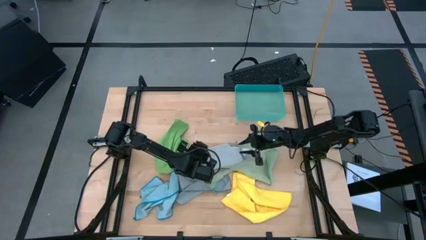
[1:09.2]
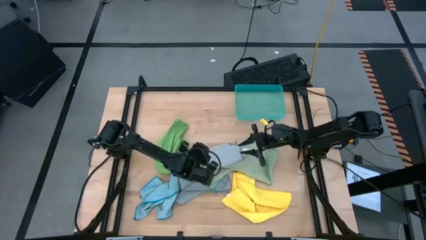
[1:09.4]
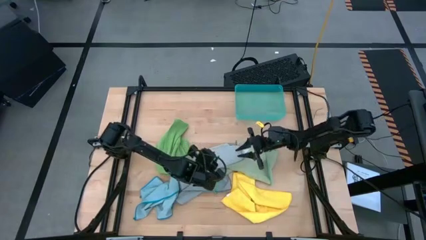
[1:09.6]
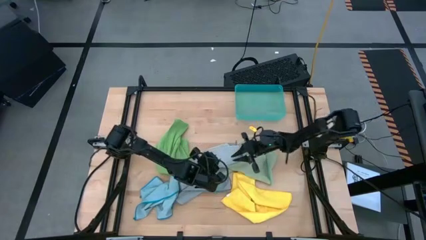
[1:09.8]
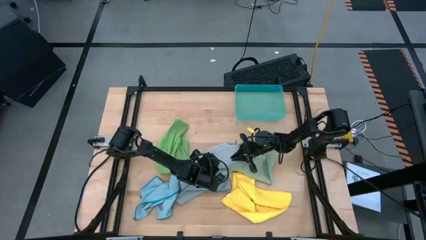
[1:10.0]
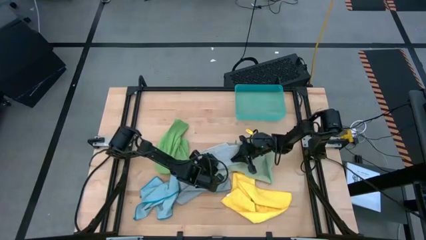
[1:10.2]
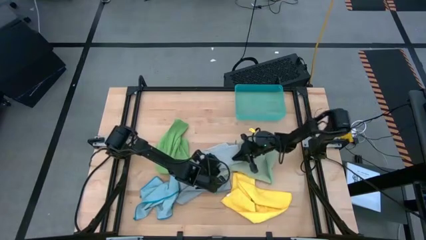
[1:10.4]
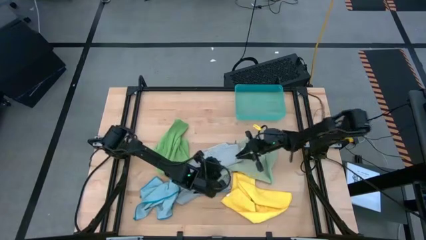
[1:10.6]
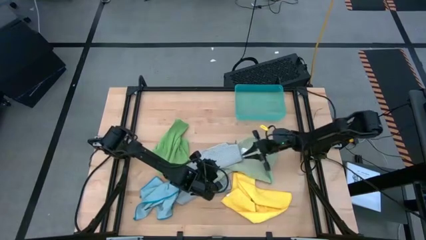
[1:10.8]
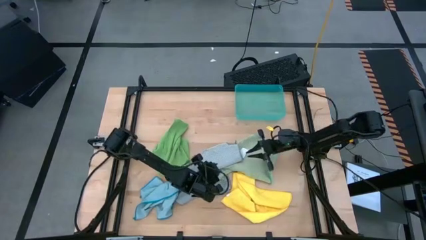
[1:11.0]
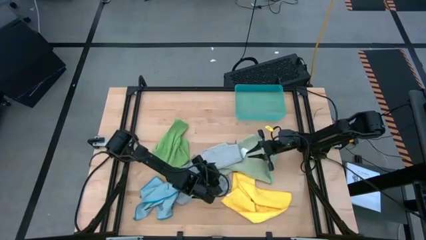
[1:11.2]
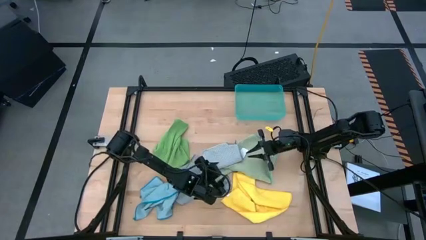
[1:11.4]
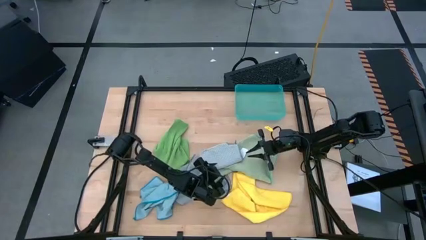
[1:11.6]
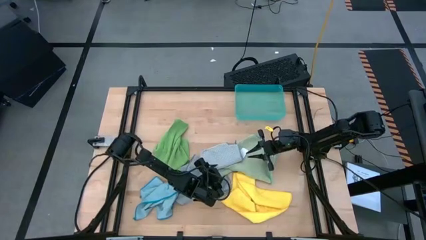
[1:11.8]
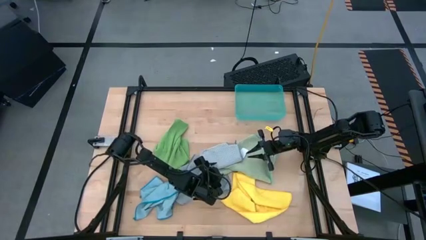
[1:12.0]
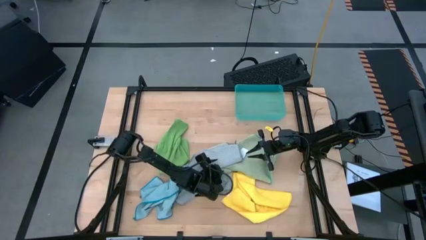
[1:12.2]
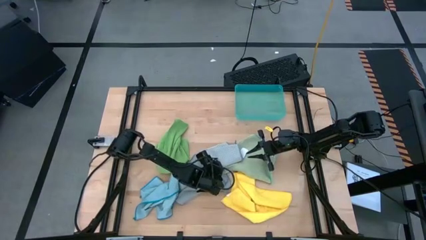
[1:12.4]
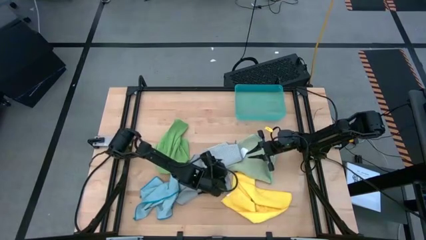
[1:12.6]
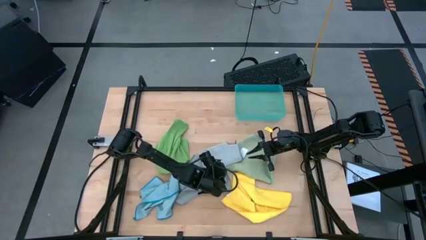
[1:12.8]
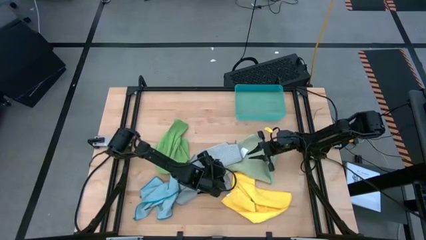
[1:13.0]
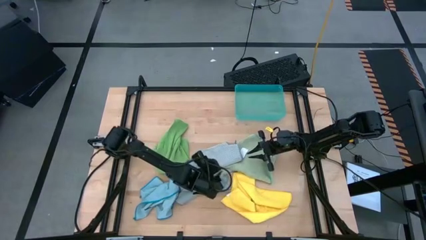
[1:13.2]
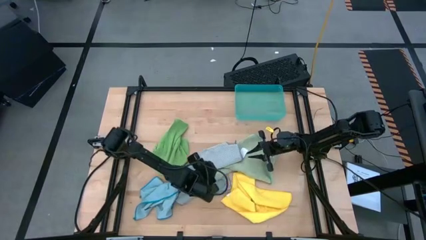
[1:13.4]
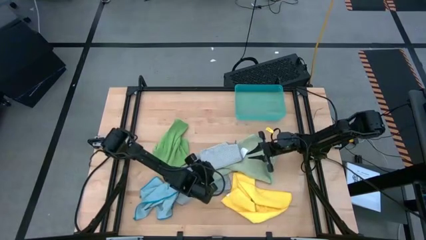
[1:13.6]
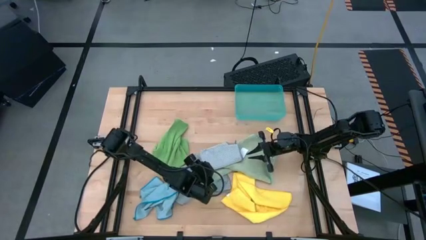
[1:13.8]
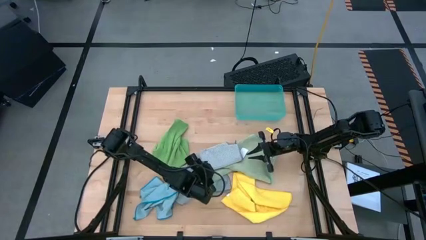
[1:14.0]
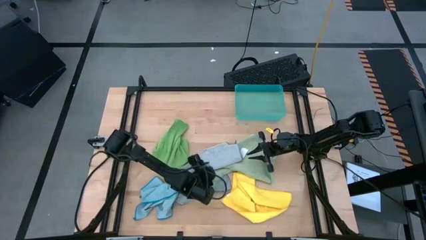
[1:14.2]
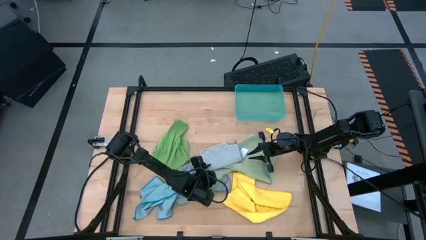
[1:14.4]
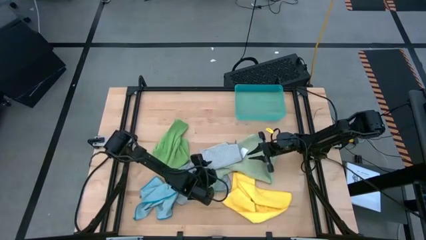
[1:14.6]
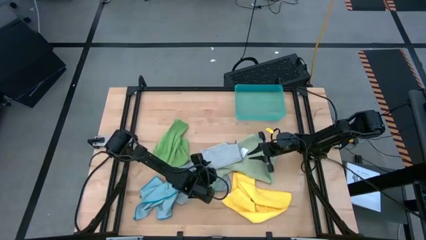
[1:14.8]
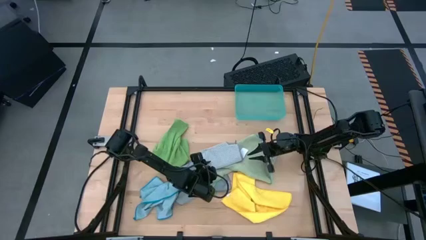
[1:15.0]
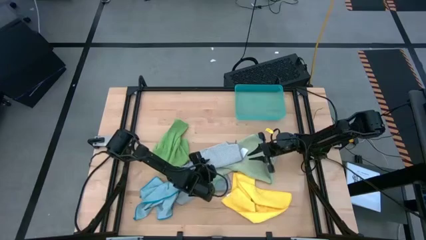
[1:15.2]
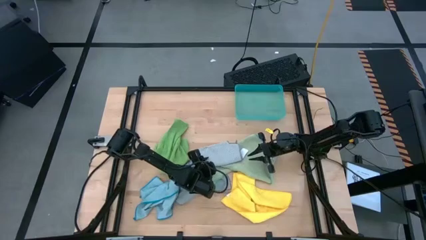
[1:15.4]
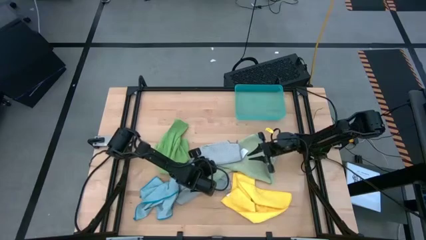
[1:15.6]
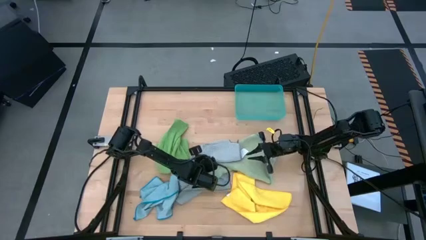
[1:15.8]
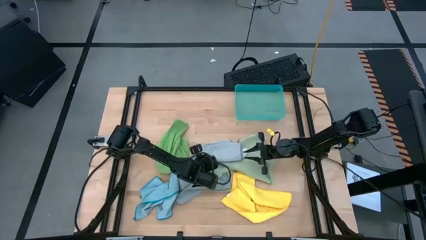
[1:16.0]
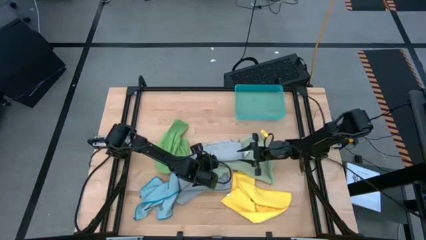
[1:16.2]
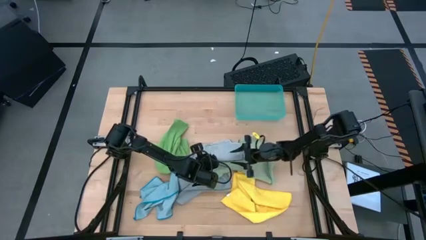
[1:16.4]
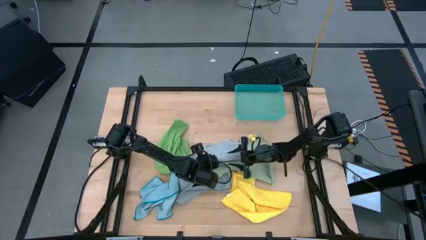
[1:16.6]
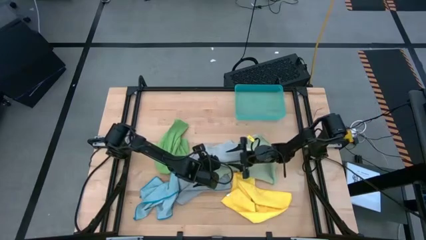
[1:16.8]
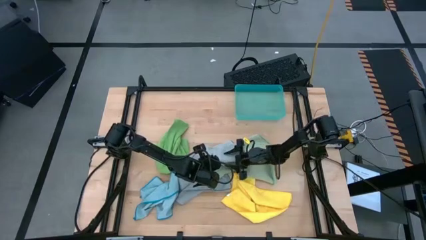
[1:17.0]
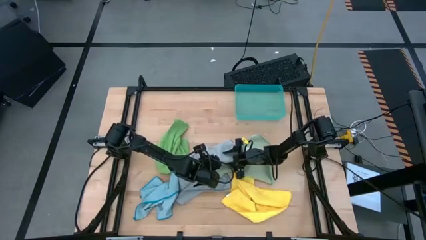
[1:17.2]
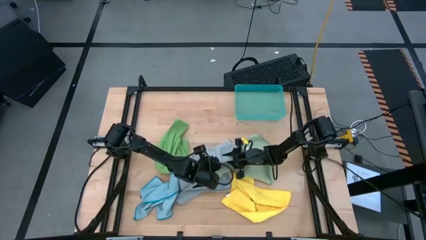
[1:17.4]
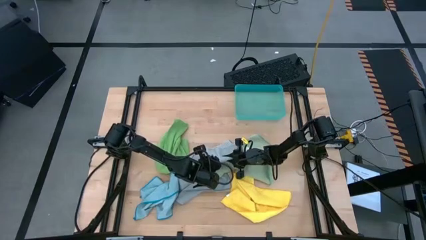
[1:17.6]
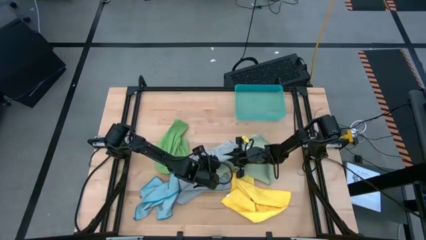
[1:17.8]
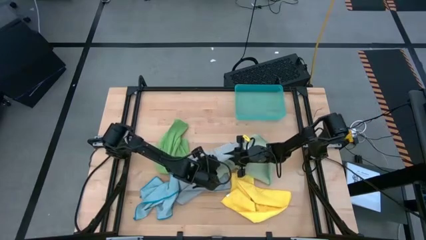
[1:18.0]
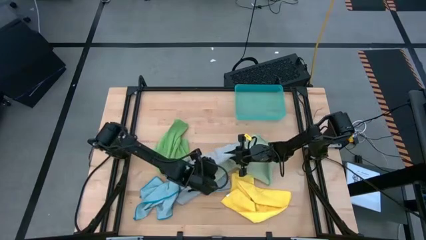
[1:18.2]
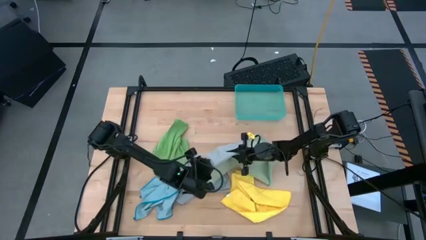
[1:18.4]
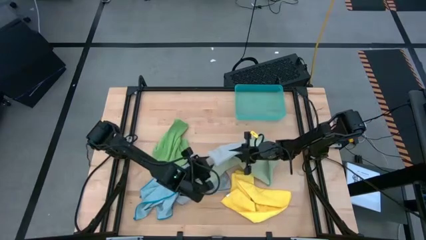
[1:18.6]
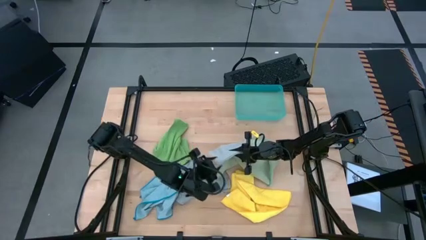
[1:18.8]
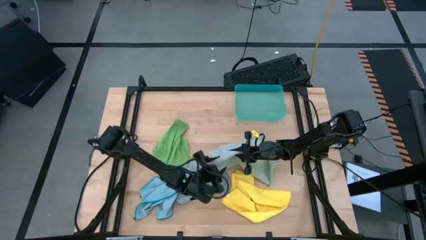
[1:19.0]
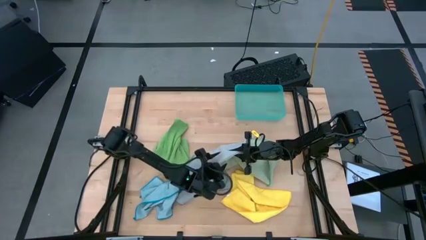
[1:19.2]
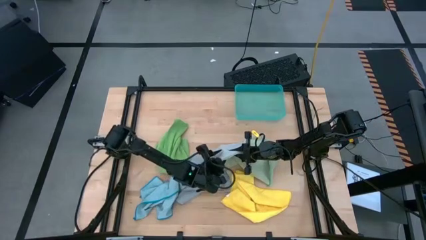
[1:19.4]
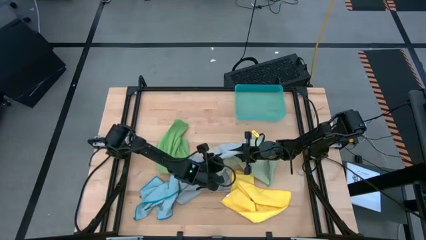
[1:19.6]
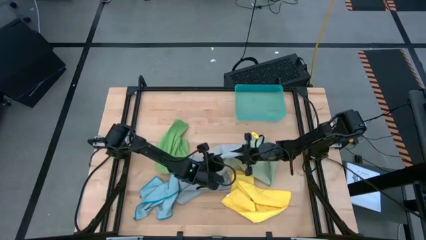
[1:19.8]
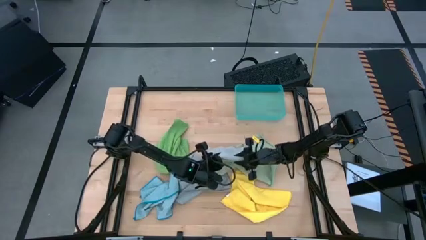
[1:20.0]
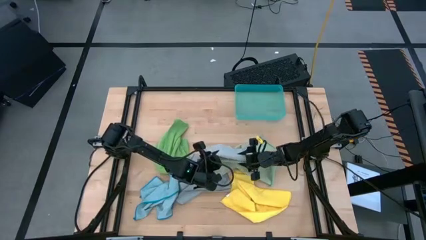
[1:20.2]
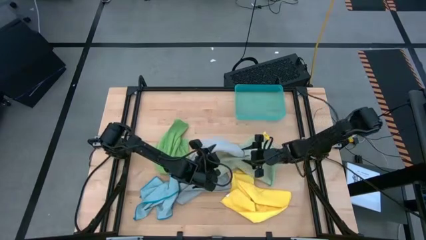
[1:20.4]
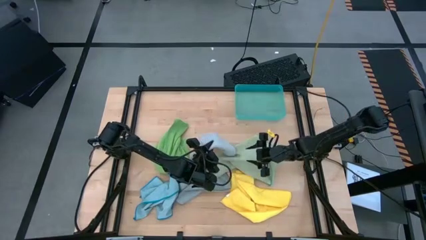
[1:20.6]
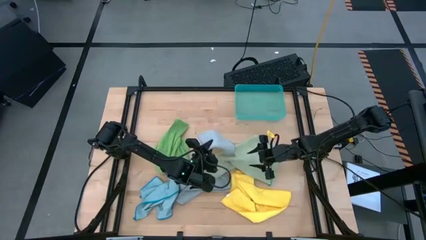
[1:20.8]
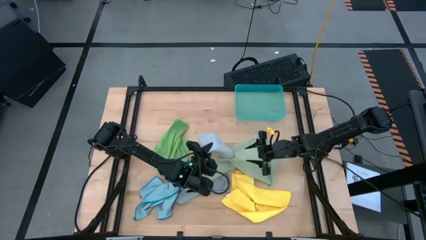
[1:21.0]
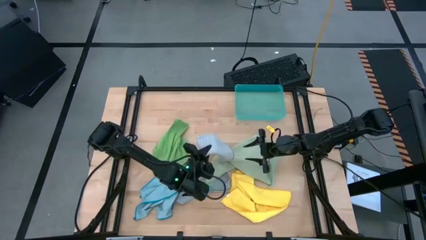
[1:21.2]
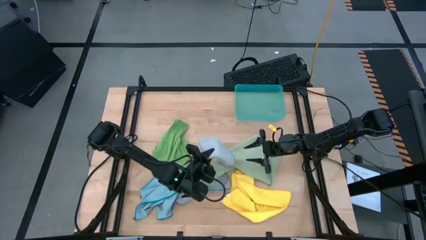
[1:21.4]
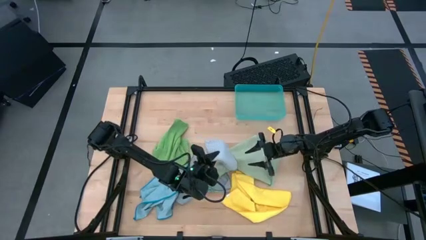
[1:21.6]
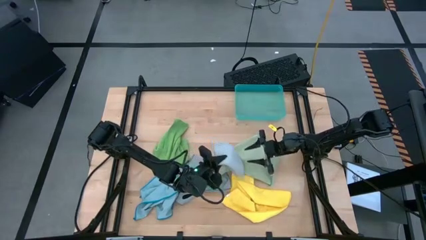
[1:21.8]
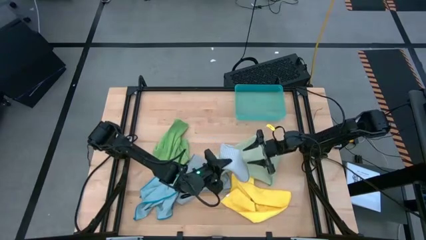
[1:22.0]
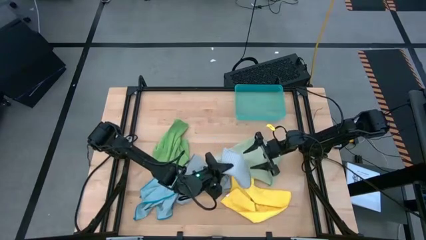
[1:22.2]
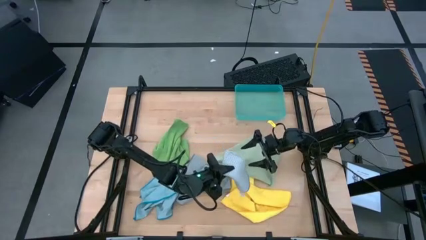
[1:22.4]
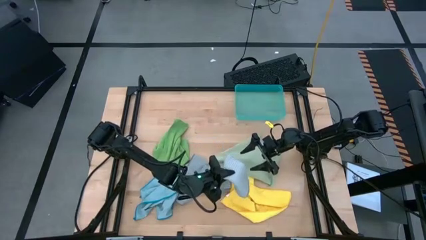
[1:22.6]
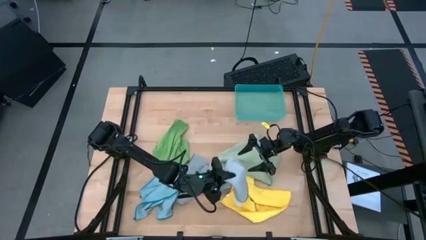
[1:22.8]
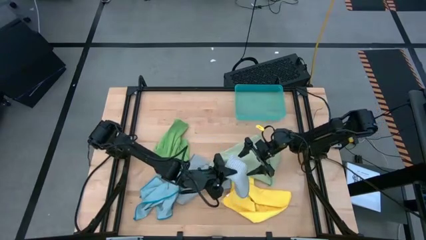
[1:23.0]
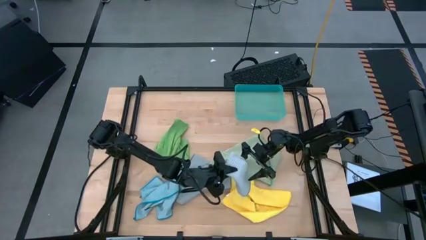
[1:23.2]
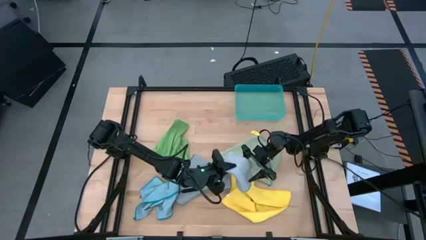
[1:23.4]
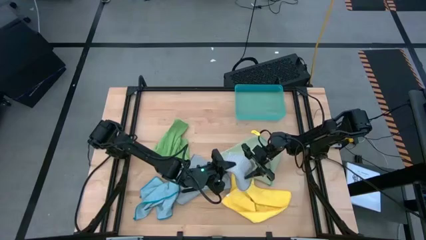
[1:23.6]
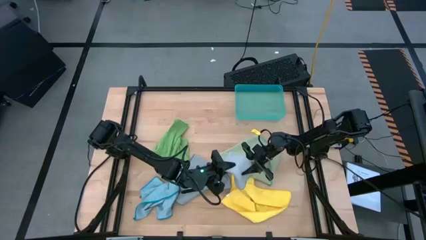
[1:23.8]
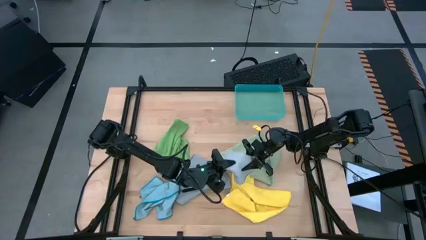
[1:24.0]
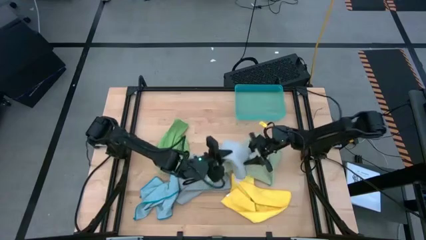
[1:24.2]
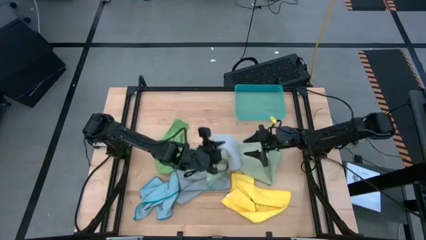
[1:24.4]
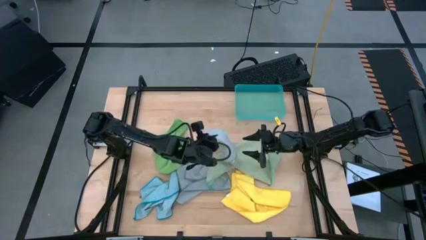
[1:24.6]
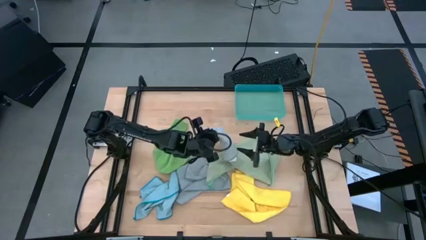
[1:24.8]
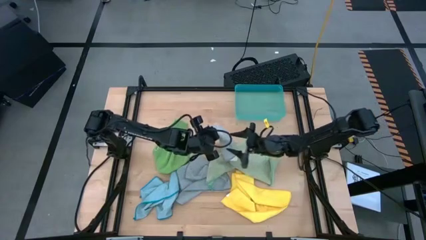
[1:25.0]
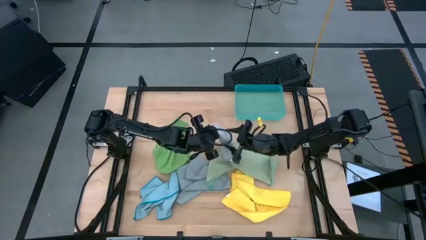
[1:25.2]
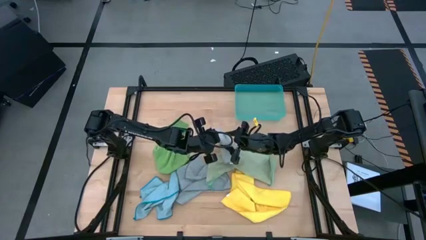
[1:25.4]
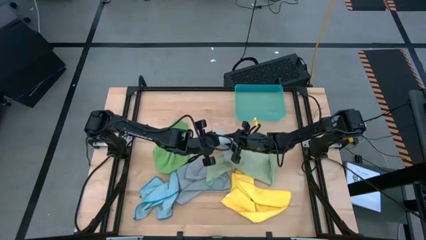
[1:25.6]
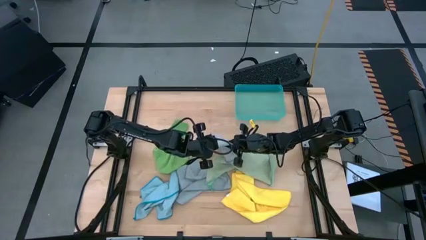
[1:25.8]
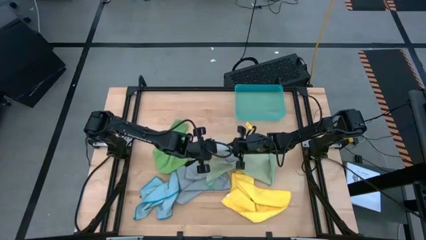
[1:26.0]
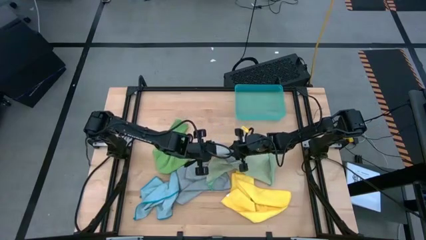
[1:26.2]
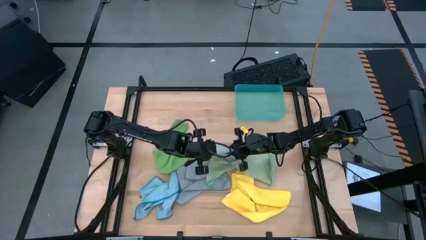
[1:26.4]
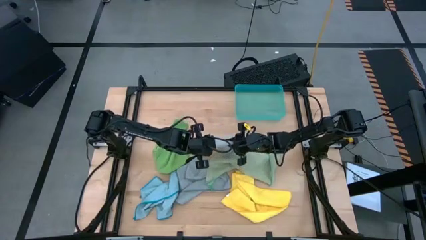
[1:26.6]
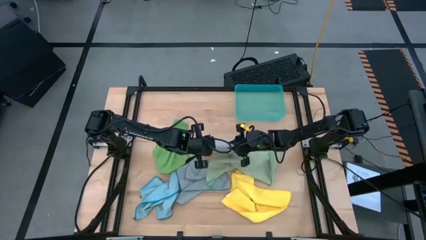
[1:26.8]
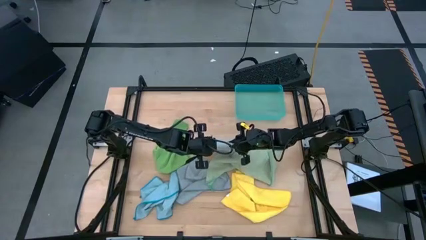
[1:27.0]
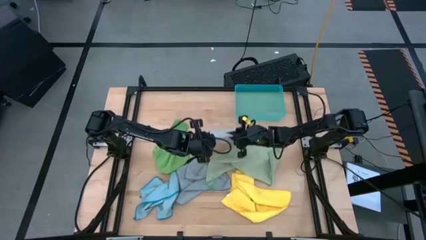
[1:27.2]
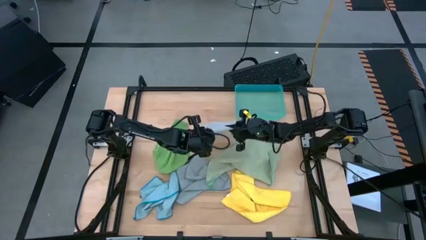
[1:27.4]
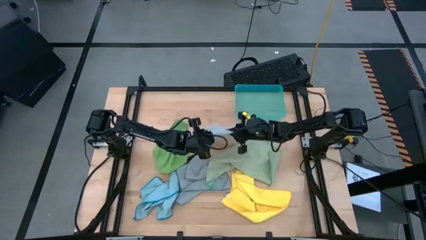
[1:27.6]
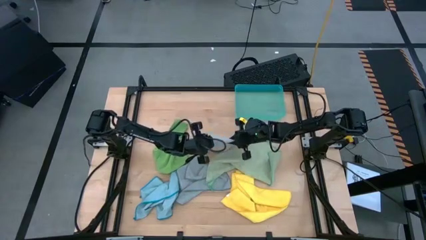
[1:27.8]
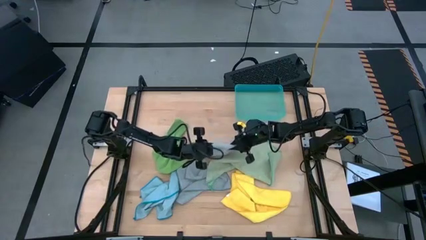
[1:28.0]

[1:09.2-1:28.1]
Task: Fold microfiber towels
Put the folded gray microfiber cloth into the bin
